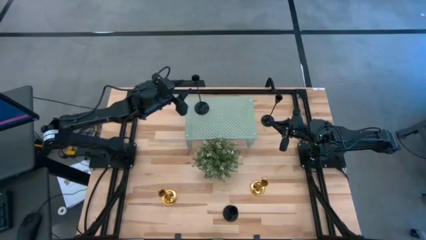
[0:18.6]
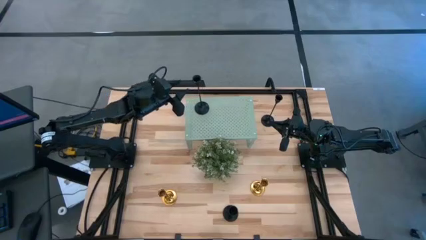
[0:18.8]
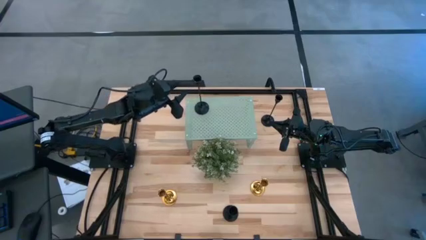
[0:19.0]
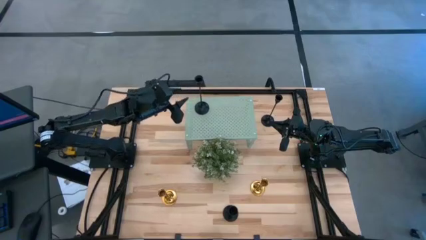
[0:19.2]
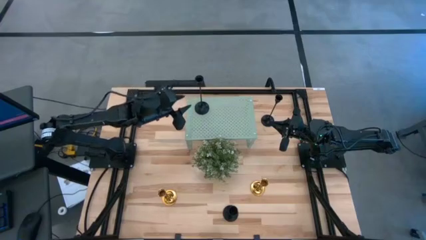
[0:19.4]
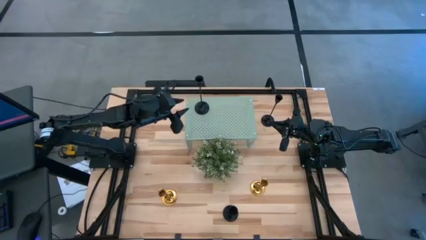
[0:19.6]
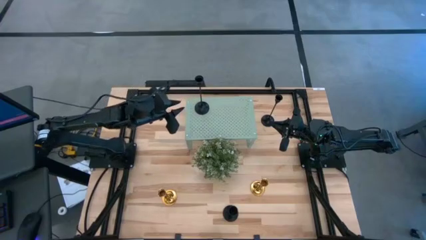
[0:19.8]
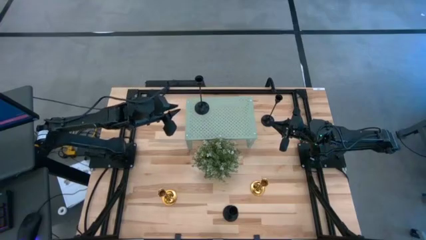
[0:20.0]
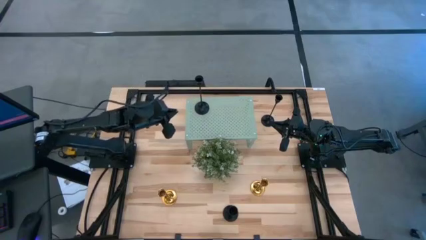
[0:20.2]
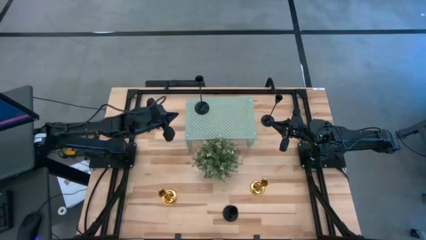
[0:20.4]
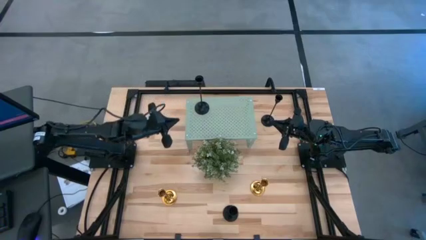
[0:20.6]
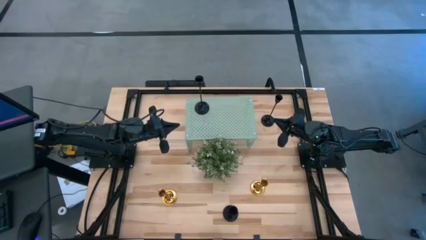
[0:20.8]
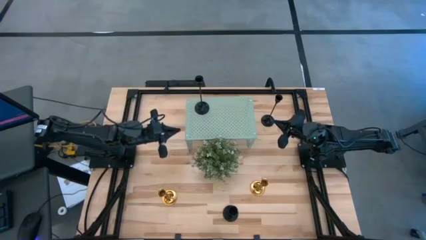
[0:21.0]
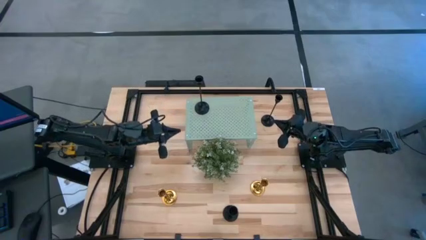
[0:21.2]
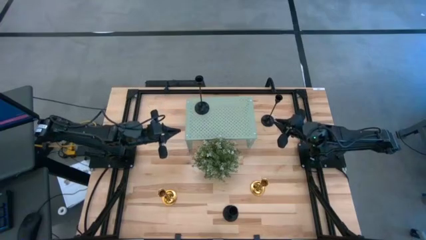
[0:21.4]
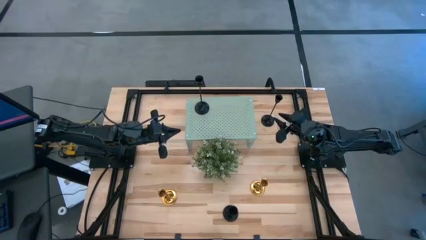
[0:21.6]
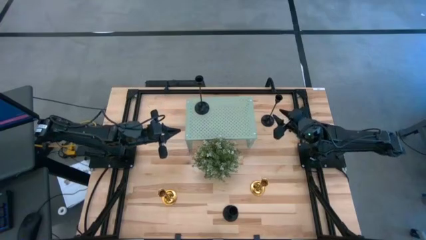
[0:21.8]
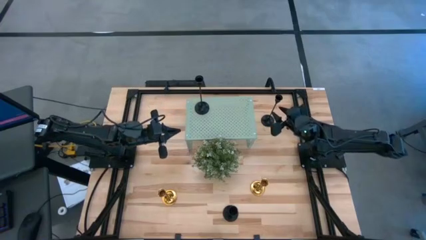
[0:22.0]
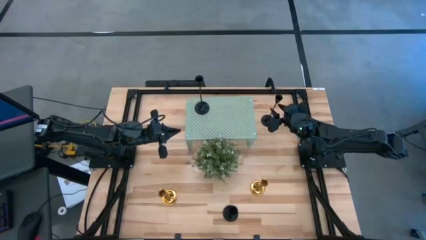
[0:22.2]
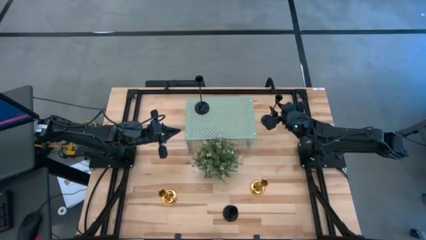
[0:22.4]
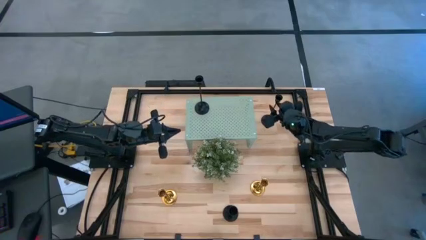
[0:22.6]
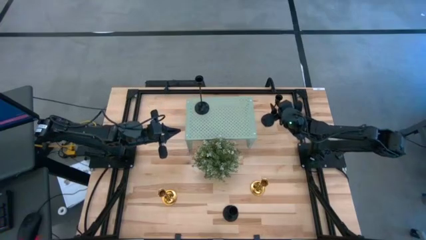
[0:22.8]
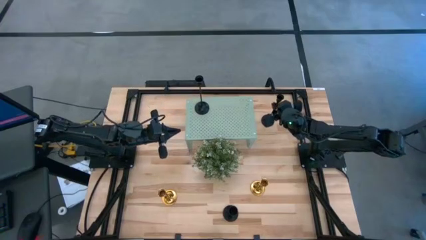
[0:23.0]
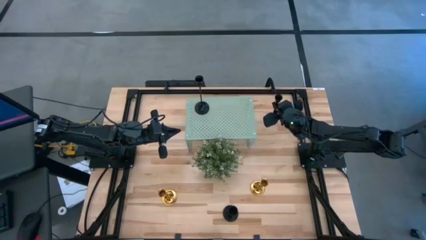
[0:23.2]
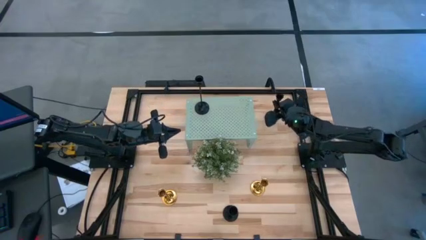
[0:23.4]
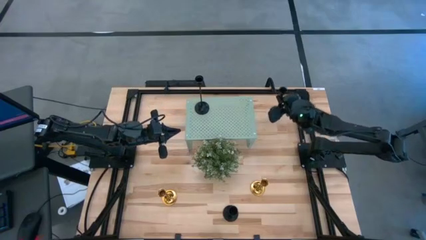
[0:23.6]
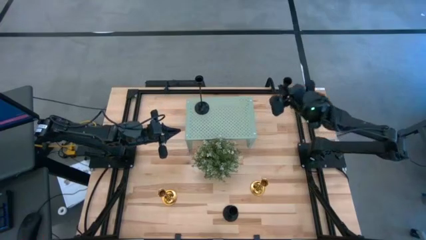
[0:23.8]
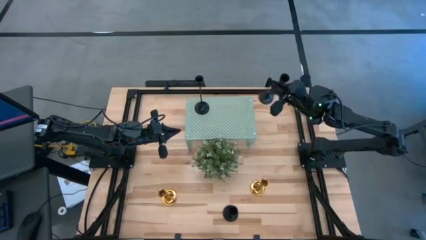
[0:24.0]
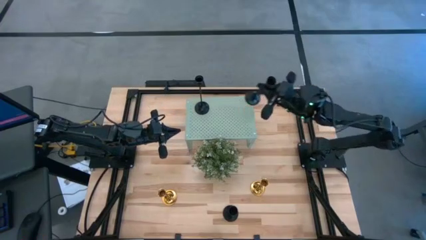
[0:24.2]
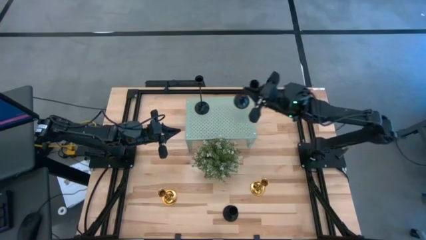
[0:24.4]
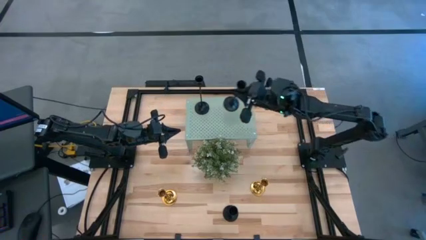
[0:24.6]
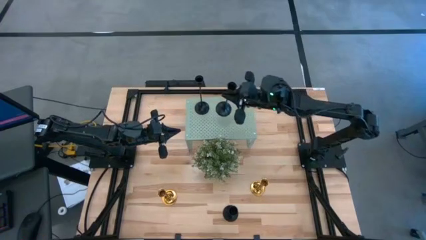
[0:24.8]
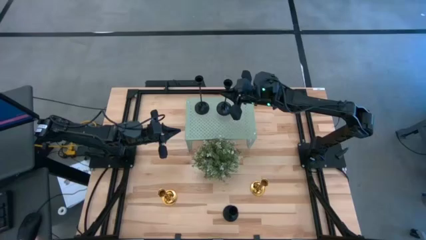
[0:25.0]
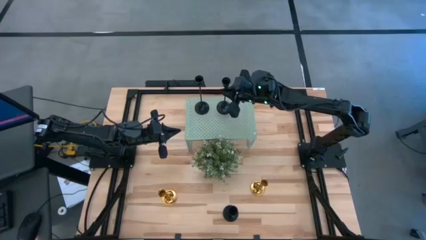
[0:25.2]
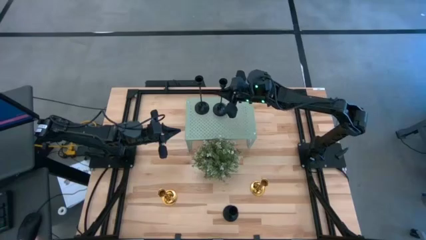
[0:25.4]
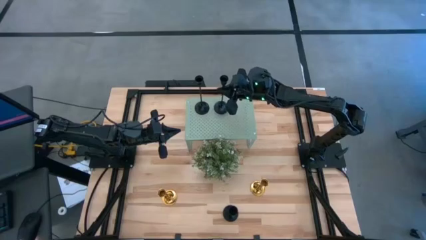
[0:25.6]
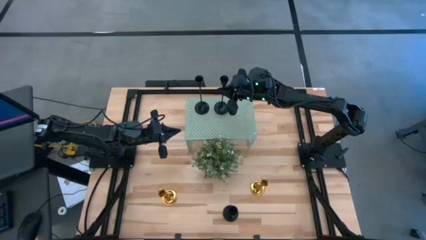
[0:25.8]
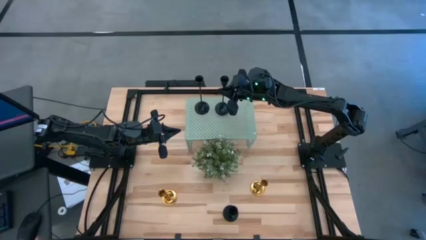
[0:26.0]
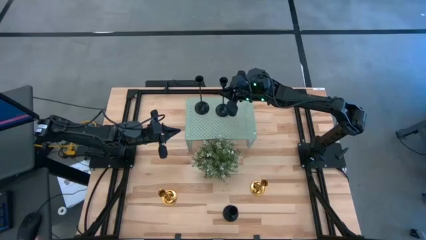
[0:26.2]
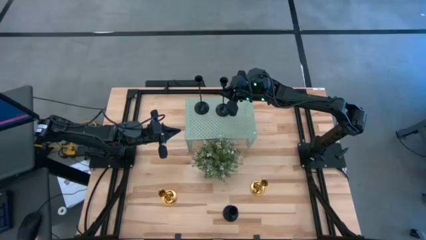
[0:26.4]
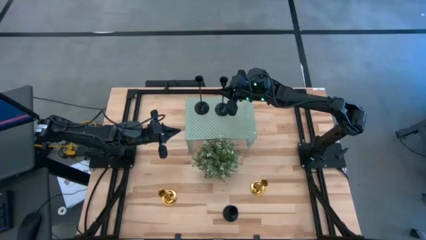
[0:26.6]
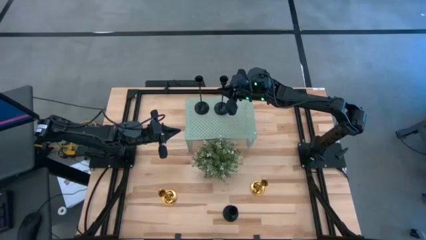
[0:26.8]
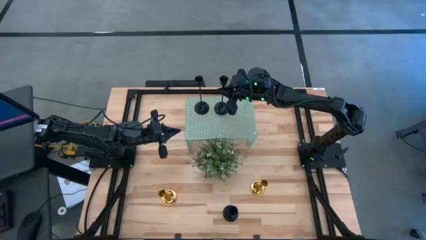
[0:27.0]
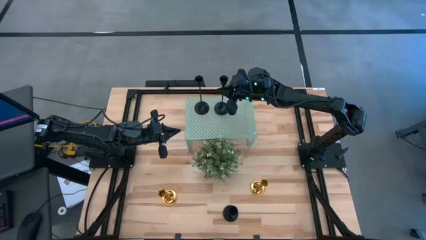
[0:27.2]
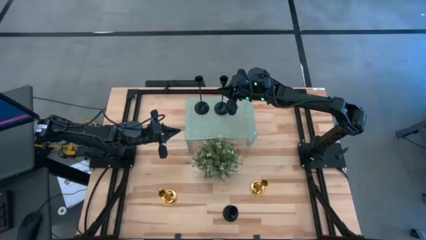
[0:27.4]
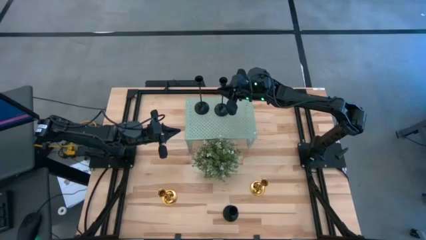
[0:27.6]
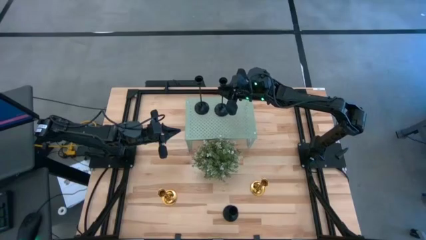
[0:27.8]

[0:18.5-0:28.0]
Task: Pick & Place candle stick holders
Put the top black candle holder on the shelf

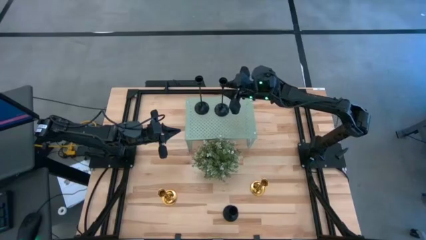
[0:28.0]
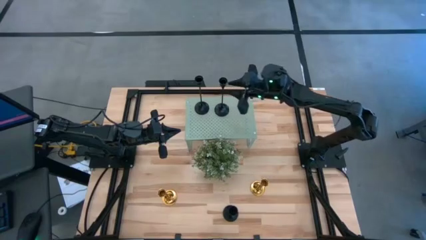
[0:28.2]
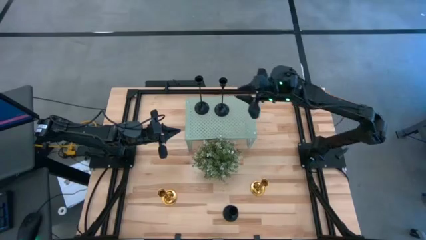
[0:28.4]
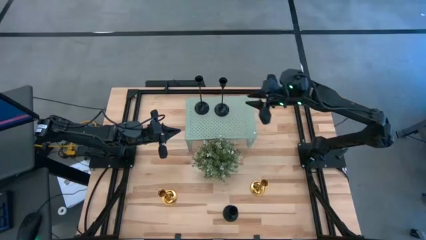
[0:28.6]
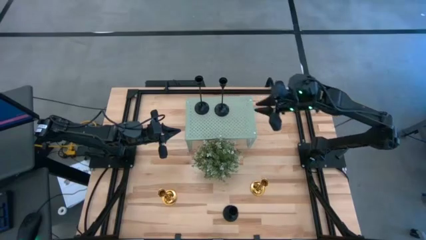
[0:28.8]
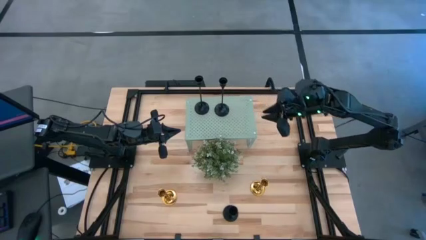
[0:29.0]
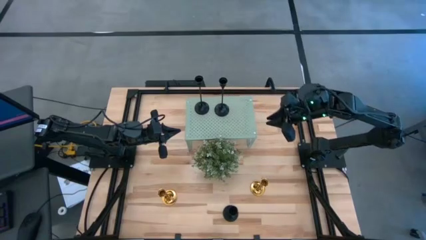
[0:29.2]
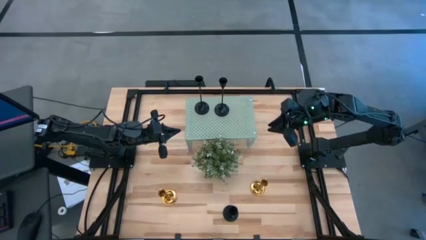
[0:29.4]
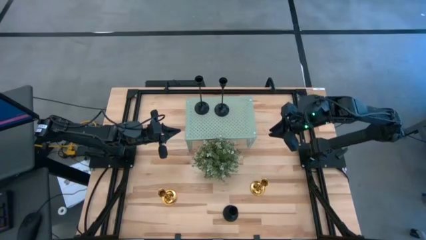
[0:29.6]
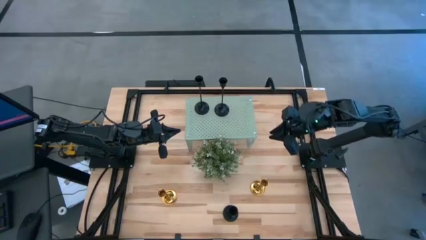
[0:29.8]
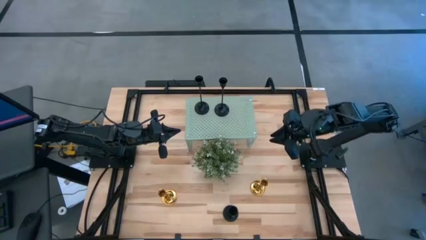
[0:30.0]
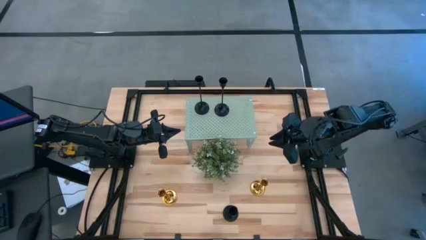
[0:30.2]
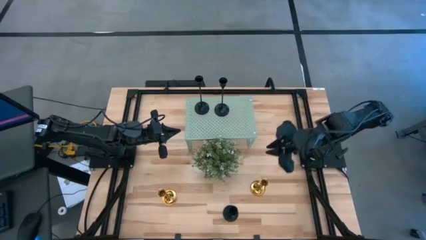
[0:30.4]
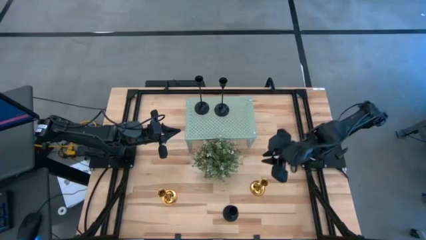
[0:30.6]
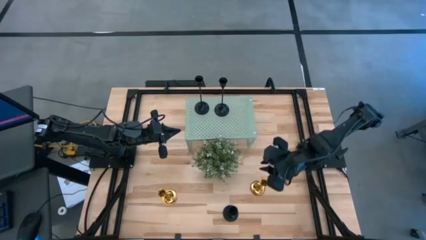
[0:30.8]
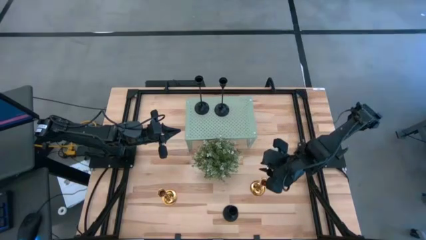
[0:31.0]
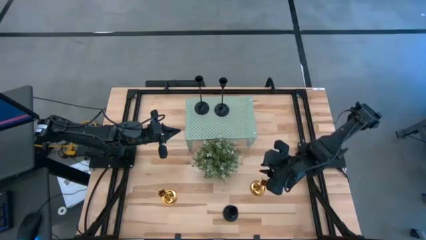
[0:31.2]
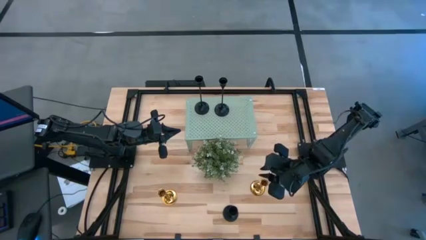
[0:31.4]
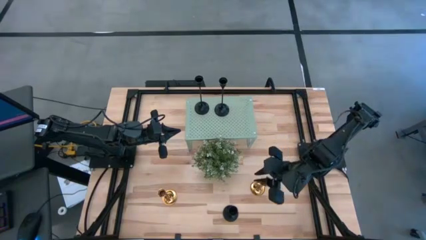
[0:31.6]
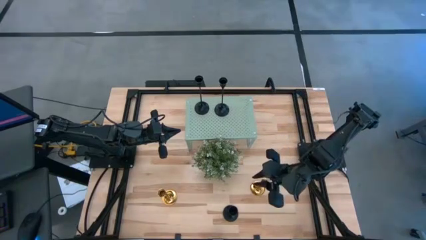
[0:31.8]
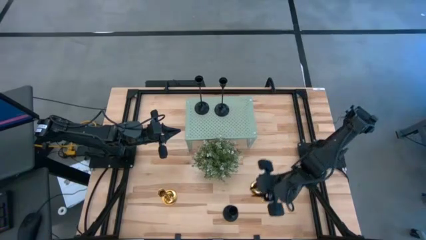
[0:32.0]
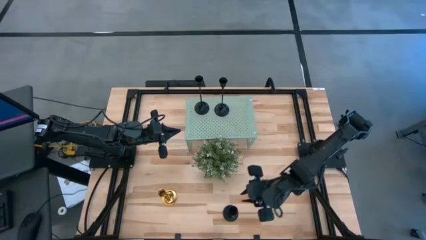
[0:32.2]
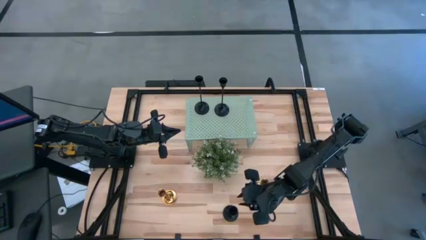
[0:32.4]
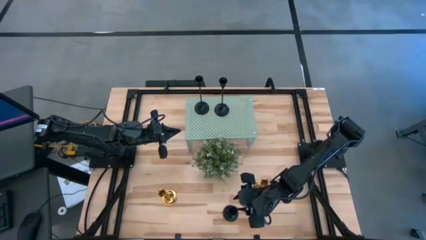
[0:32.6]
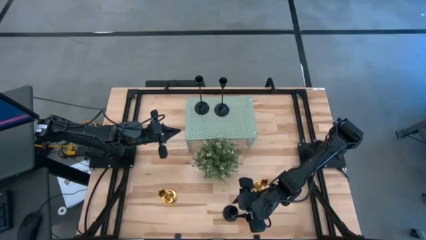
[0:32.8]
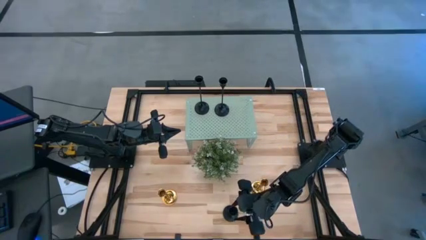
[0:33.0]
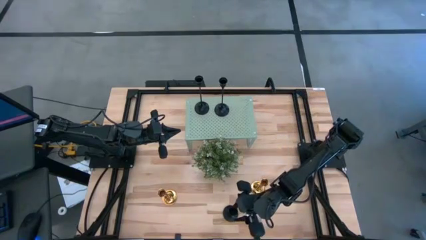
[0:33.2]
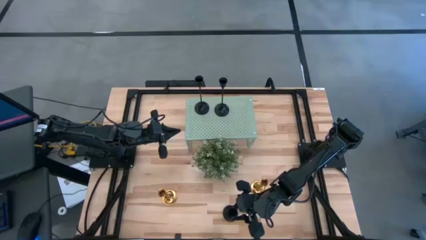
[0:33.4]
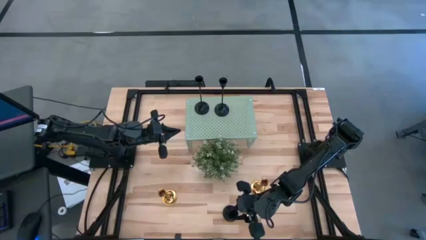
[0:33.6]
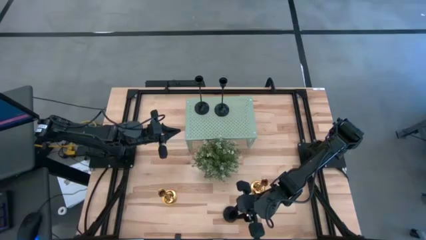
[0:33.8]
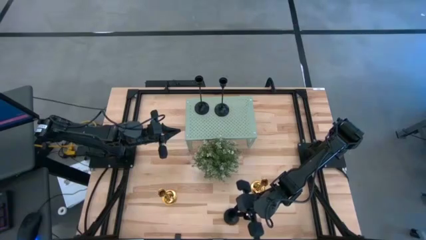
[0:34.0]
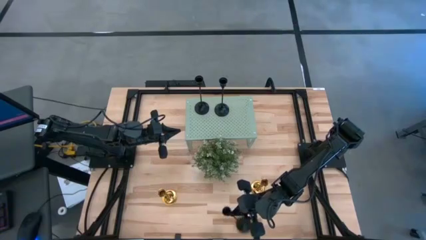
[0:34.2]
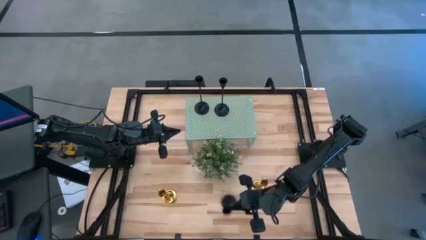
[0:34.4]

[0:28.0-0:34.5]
Put the black candle holder on the shelf

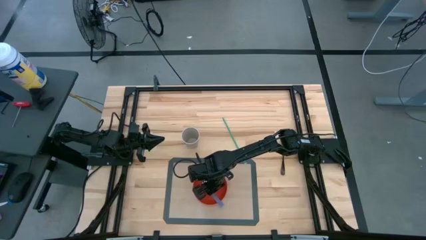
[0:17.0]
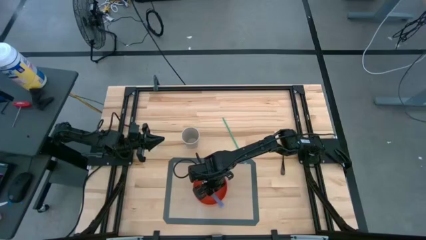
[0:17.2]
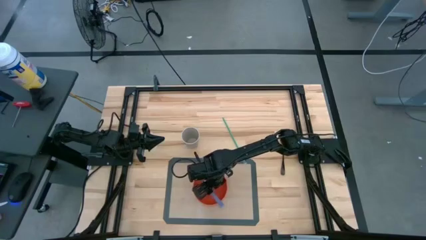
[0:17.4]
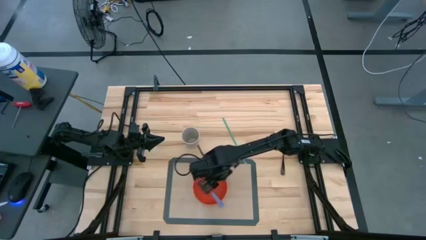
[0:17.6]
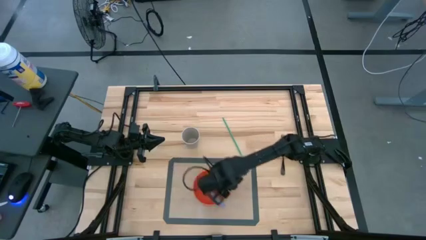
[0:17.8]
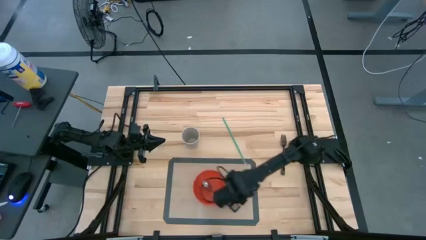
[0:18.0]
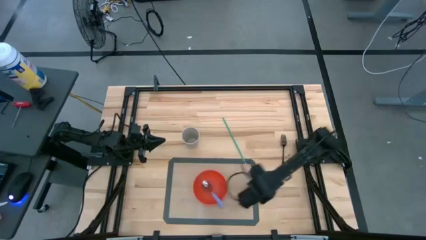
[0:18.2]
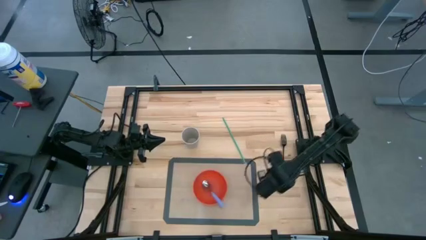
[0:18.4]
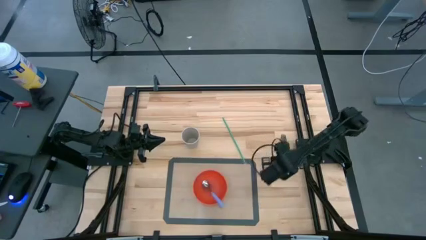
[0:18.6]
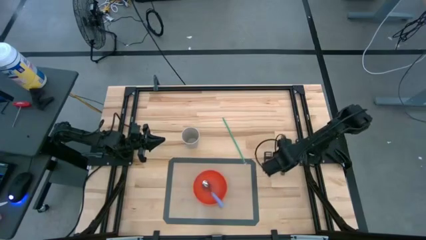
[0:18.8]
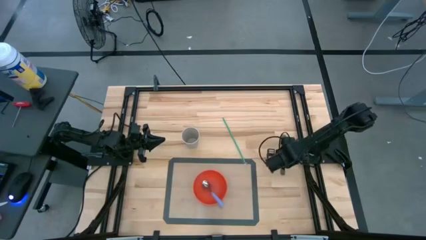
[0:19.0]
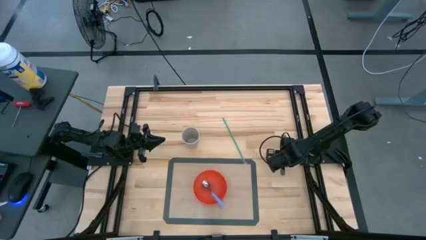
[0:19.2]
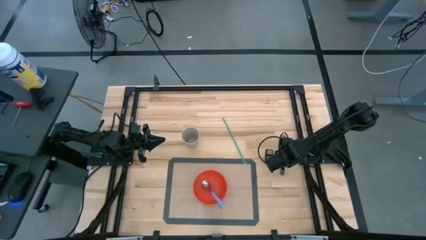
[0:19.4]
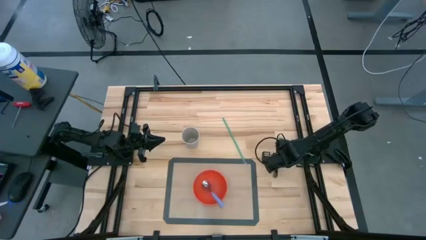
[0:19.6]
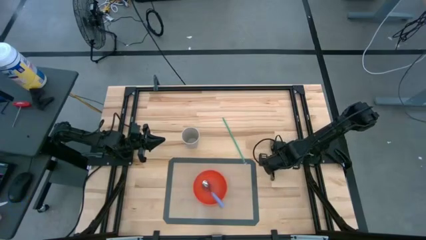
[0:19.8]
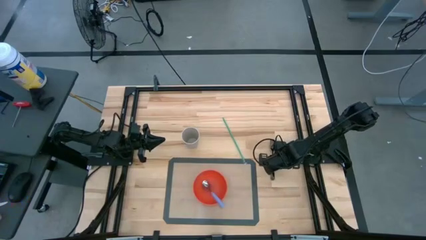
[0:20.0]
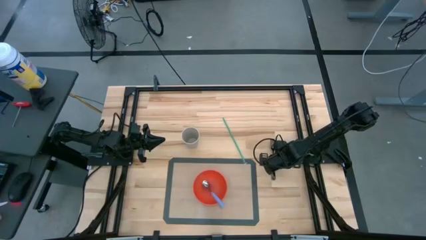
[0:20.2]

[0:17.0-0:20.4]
Task: Pick & Place Utensil
Put the black fork into the orange bowl on the transparent mat
